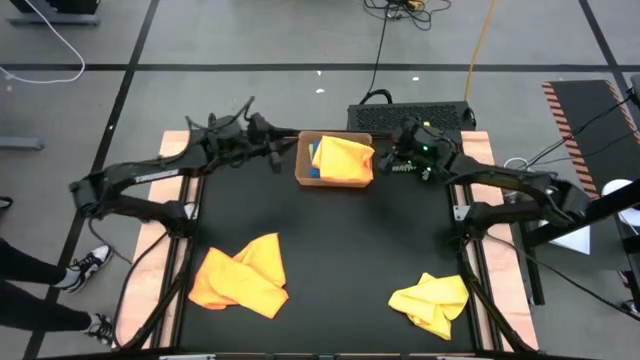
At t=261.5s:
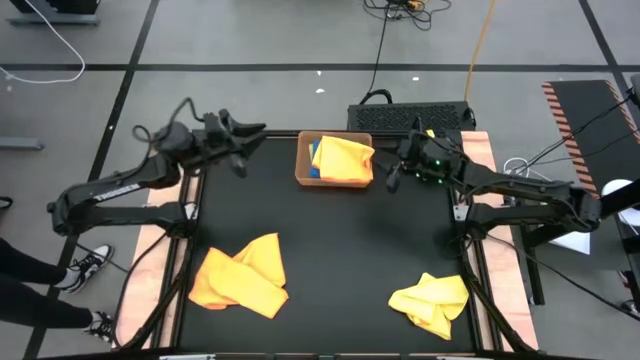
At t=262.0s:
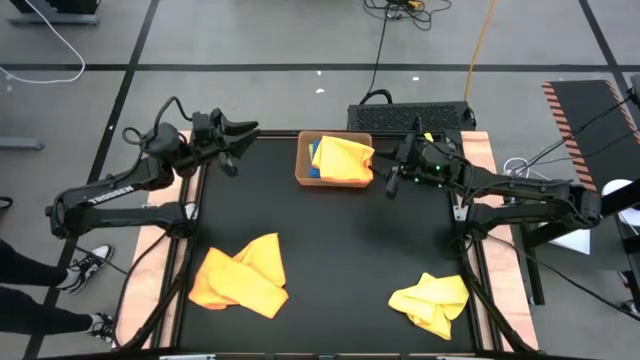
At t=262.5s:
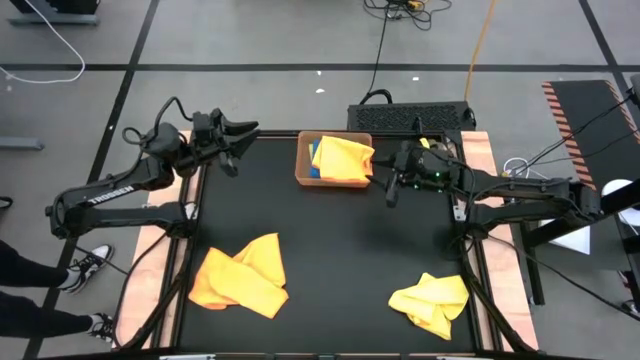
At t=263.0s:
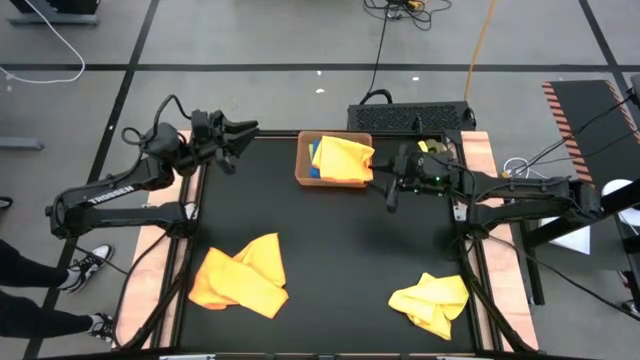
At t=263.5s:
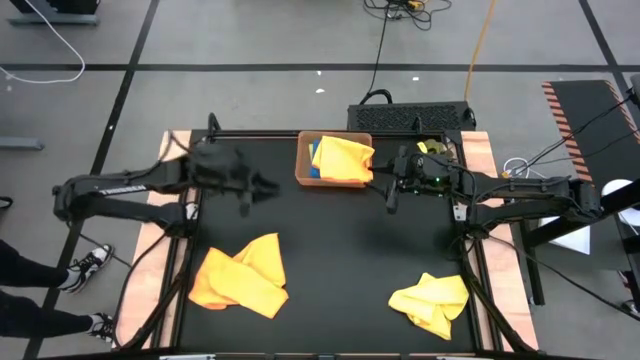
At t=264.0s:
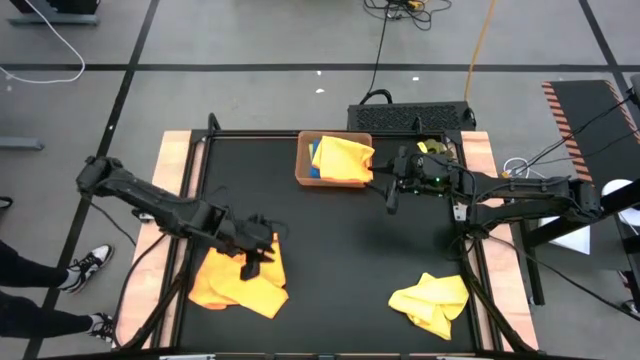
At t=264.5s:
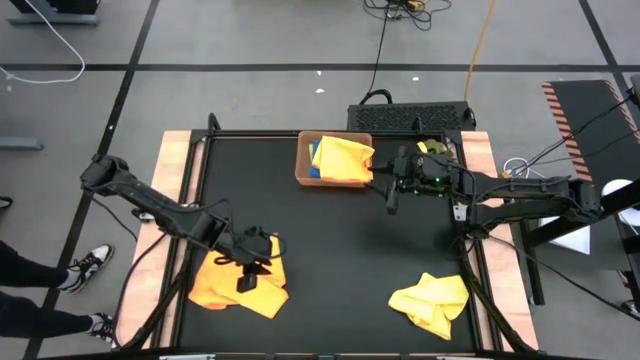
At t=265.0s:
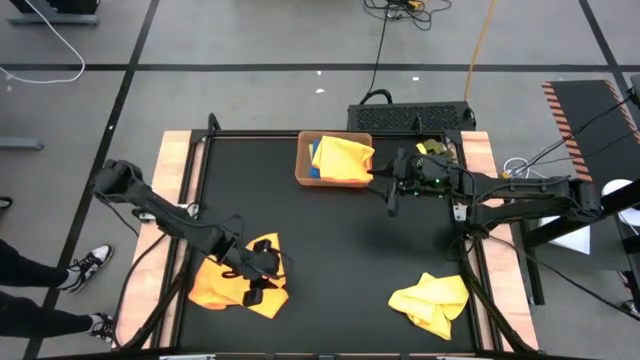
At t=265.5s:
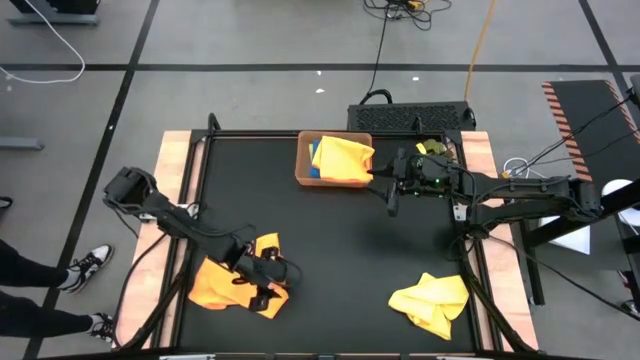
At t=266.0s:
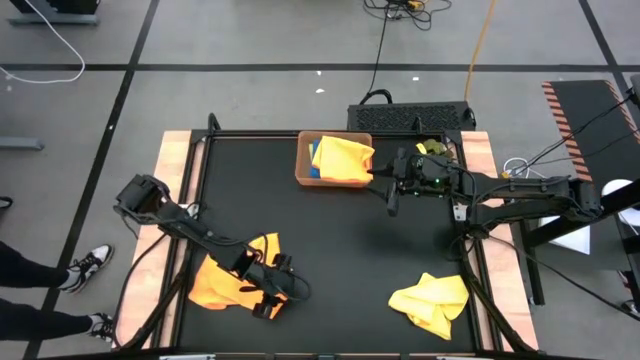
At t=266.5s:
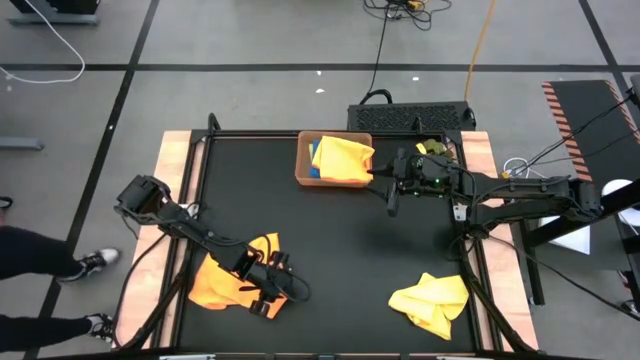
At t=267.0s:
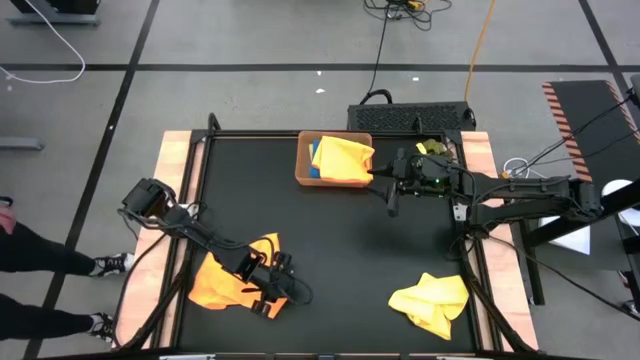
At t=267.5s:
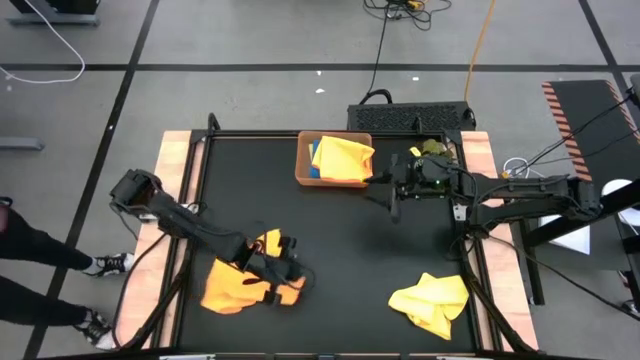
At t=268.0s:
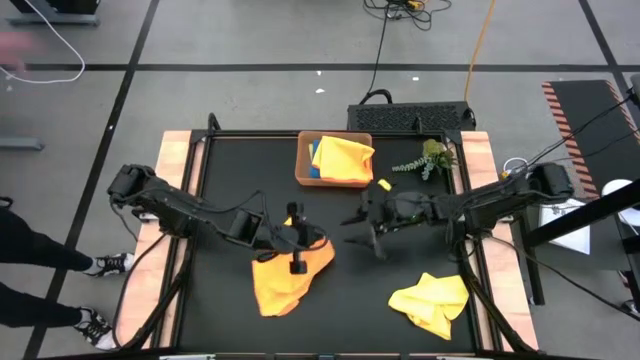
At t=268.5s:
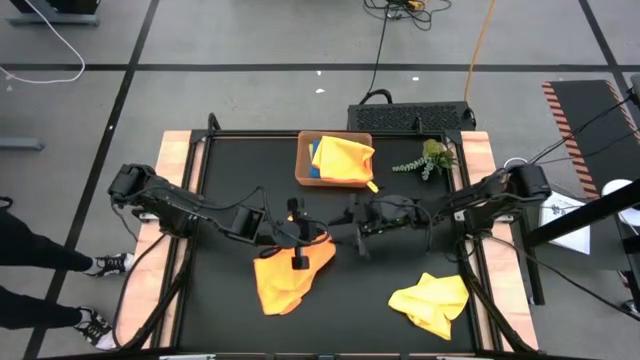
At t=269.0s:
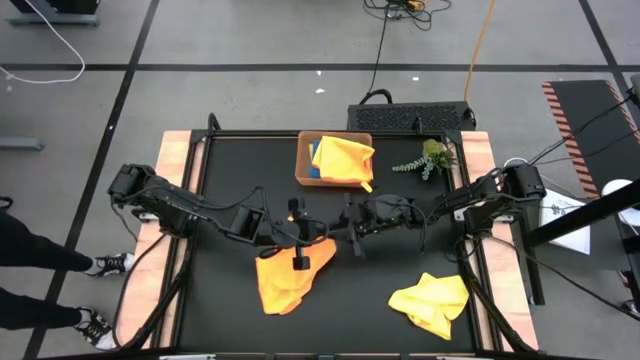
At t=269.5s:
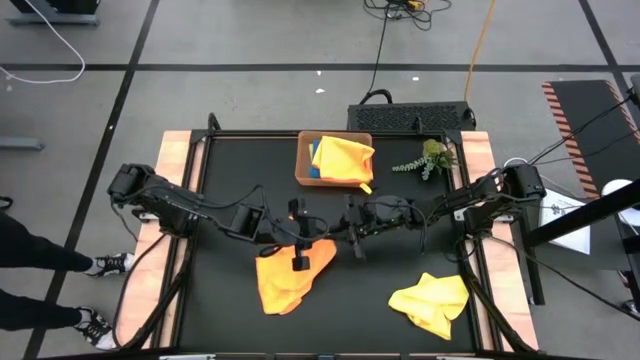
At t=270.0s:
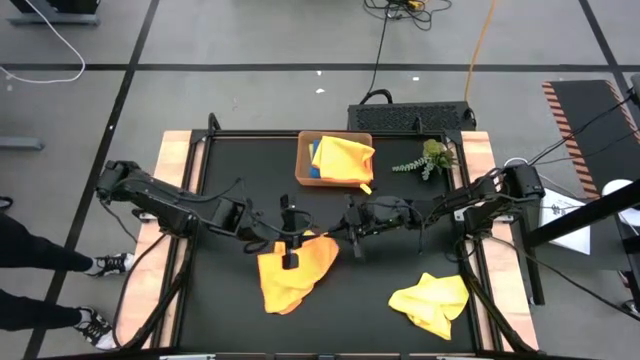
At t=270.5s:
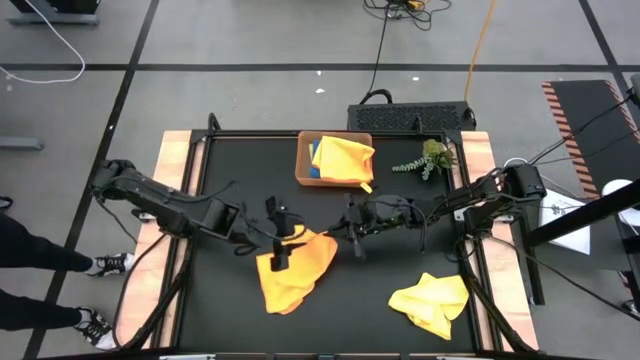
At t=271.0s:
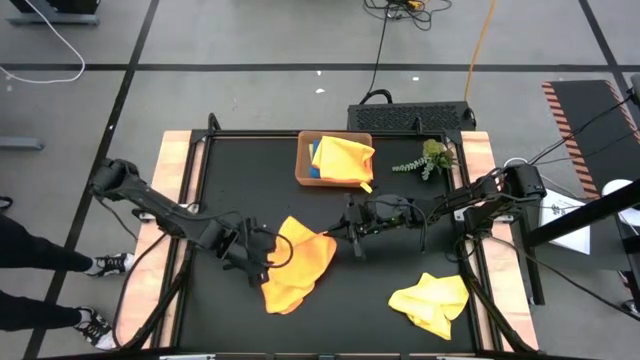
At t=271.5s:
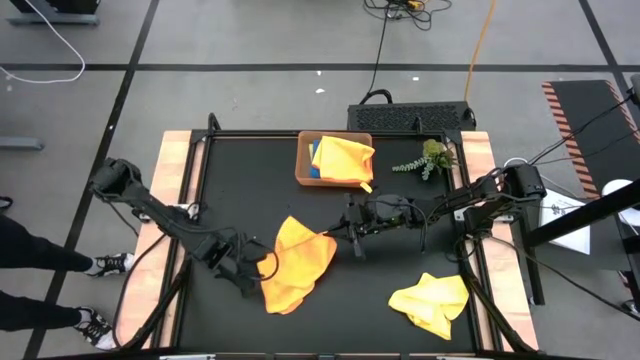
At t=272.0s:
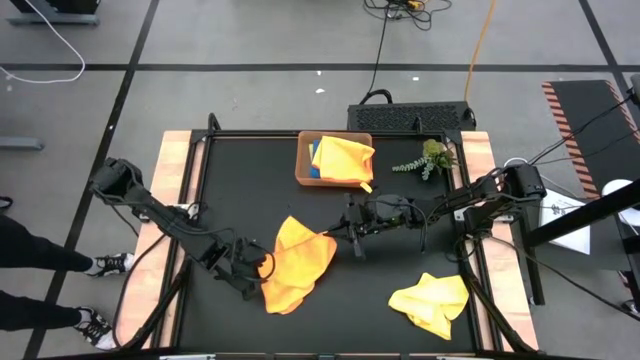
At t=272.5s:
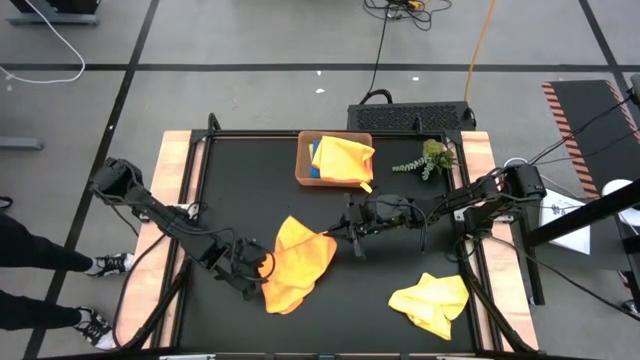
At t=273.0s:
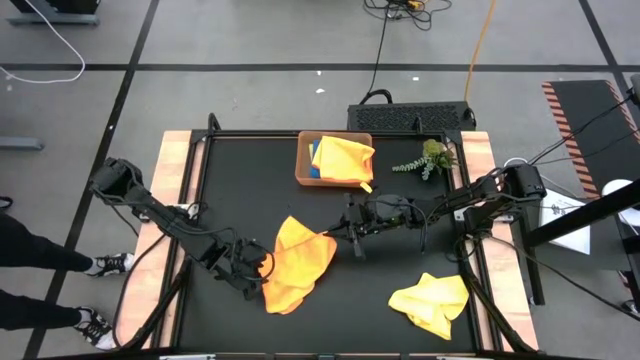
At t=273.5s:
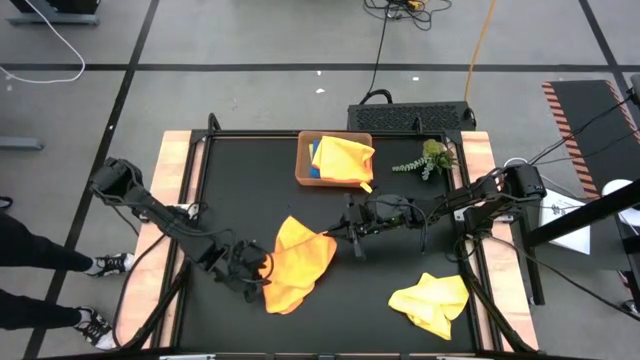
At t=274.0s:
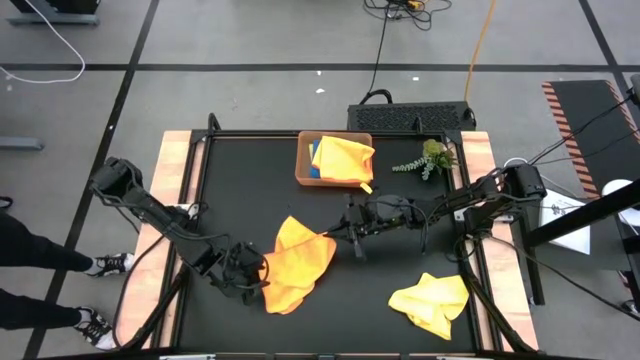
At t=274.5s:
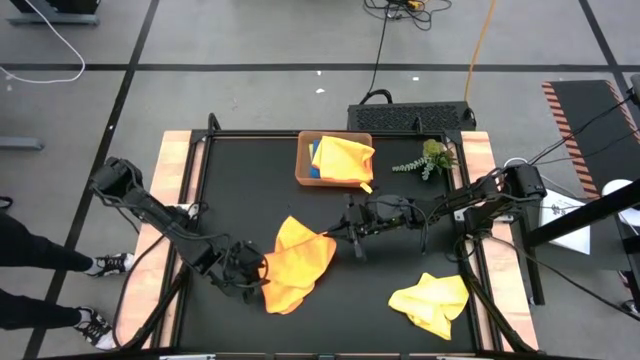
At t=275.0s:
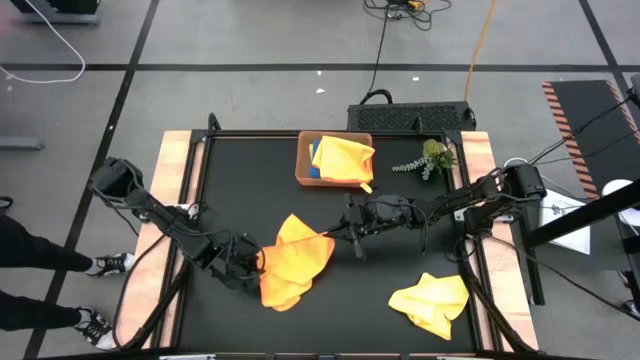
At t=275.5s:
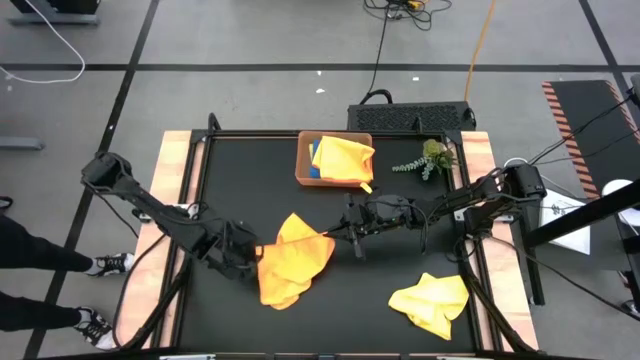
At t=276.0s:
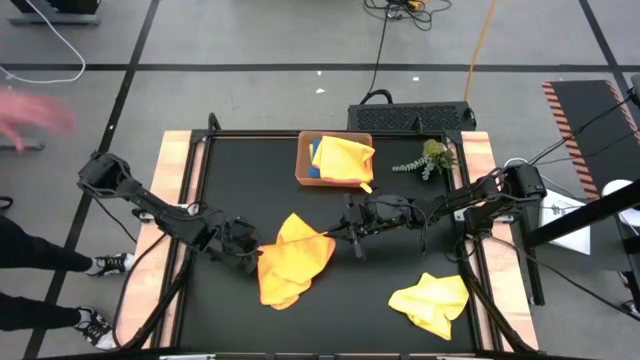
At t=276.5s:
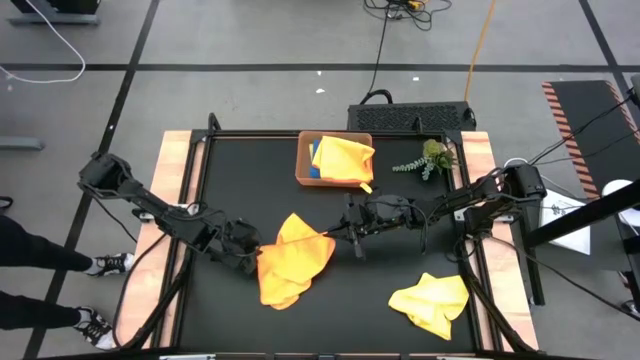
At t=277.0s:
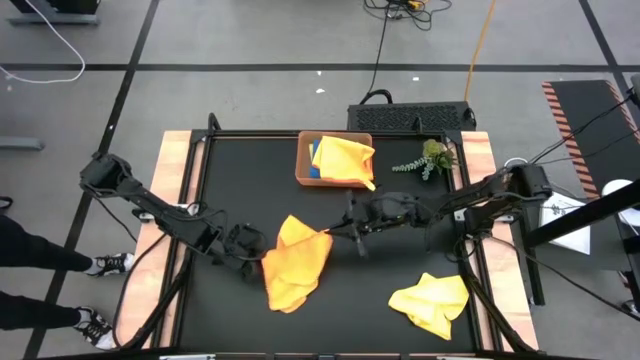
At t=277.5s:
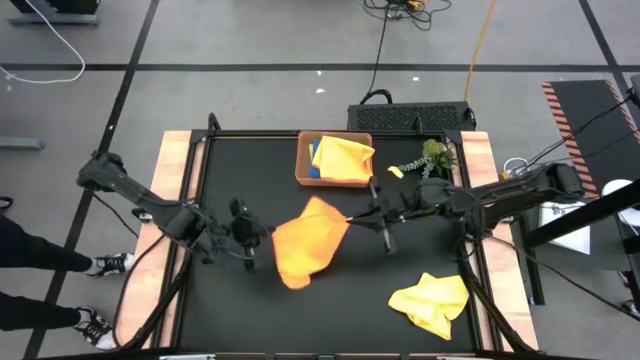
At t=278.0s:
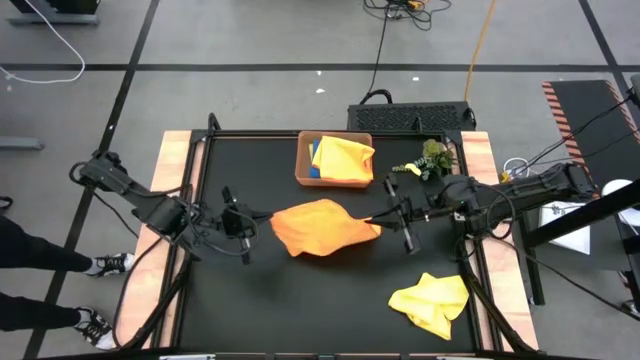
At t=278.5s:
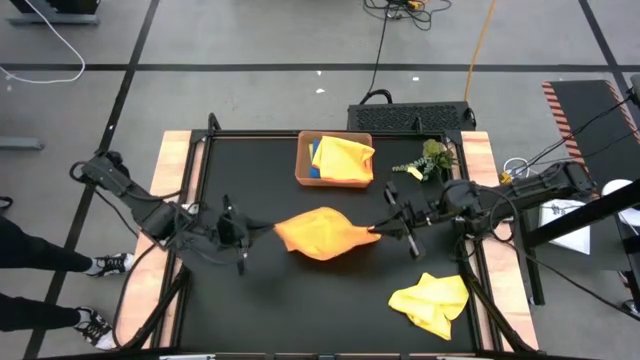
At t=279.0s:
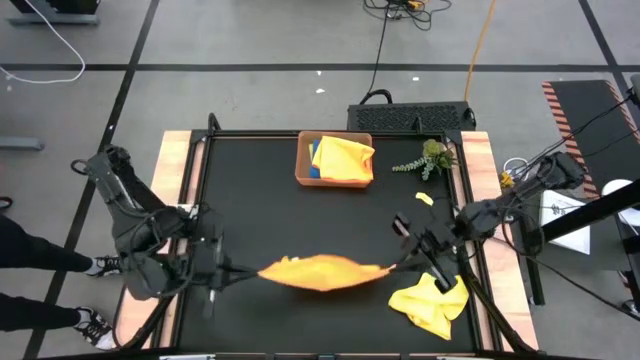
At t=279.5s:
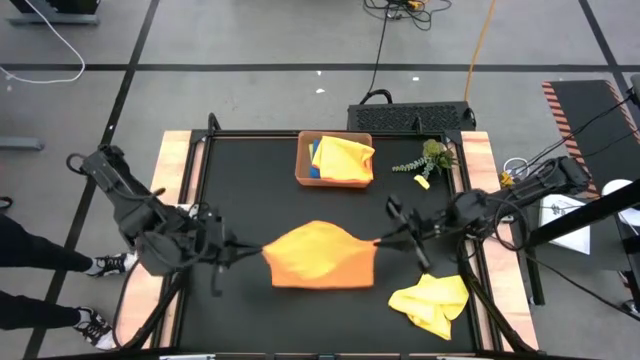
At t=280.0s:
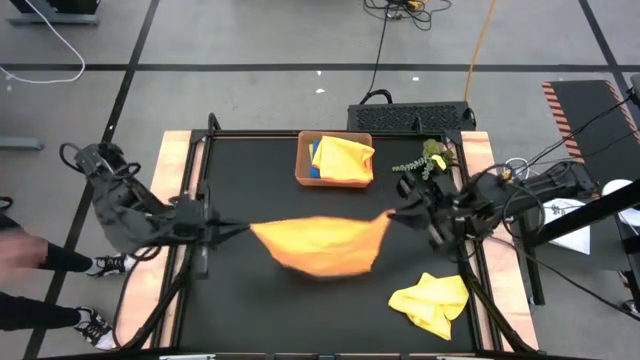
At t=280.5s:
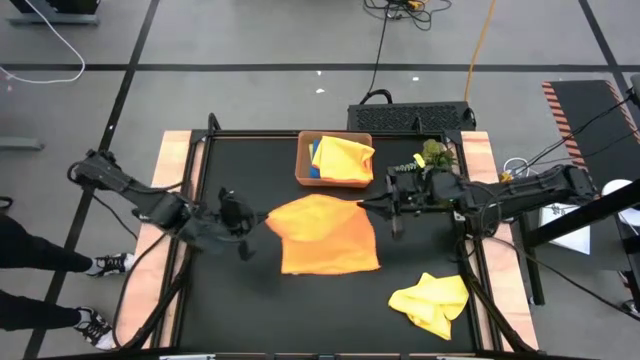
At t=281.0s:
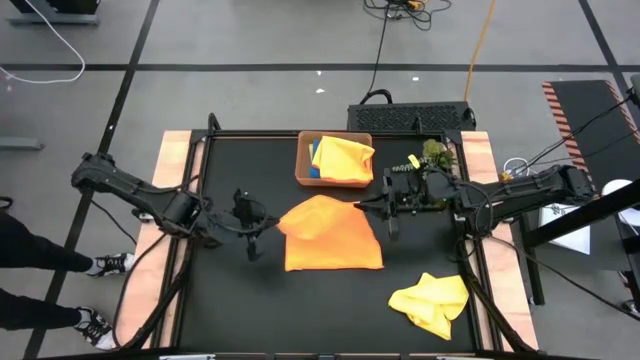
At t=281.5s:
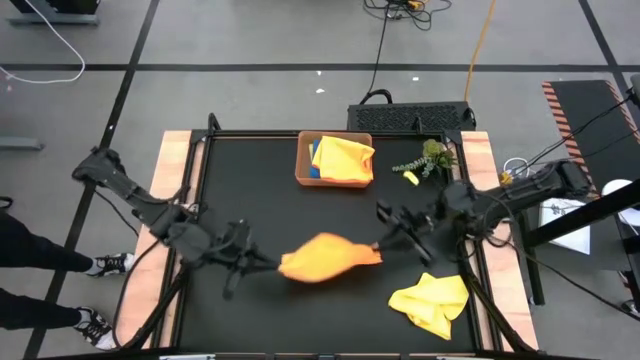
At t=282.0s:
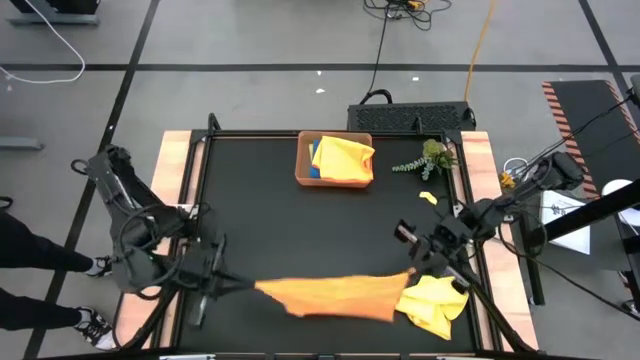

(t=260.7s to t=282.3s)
Task: Fold microfiber towels
Fold the orange microfiber towel
